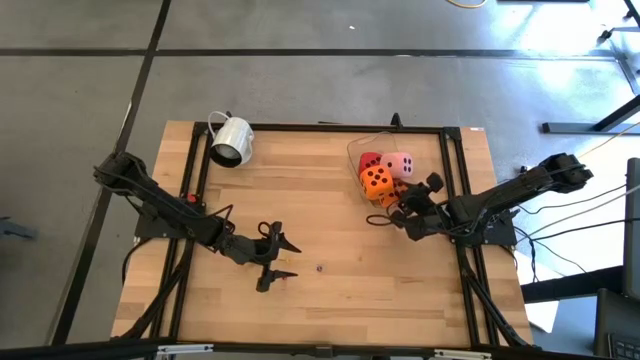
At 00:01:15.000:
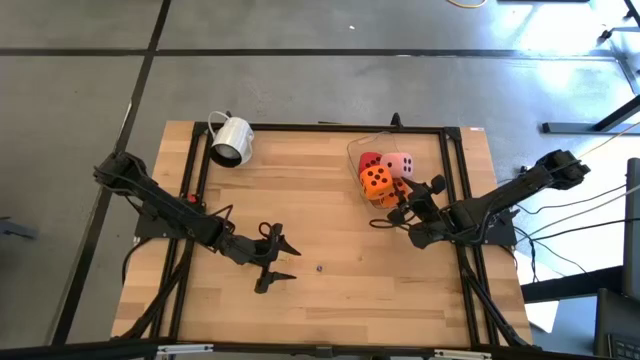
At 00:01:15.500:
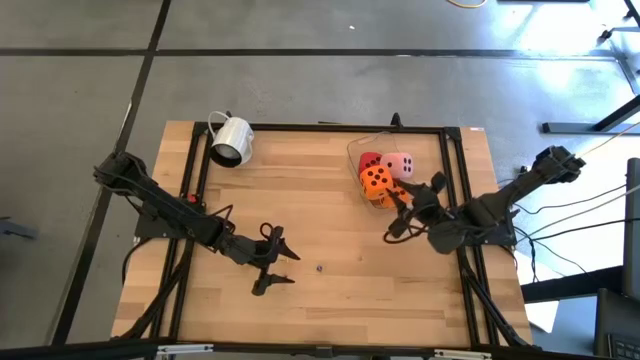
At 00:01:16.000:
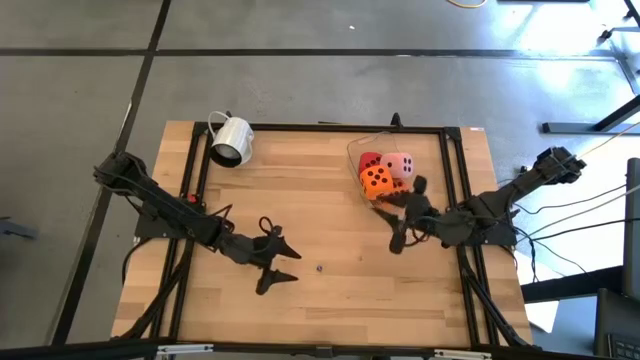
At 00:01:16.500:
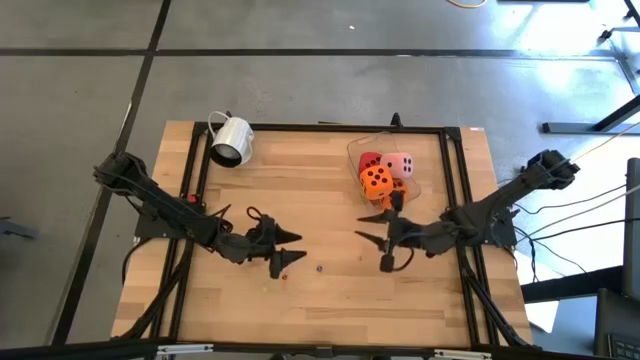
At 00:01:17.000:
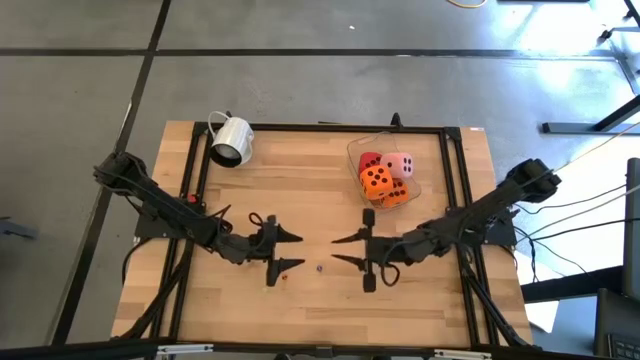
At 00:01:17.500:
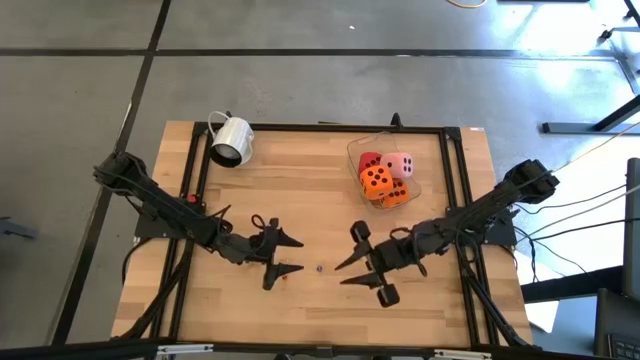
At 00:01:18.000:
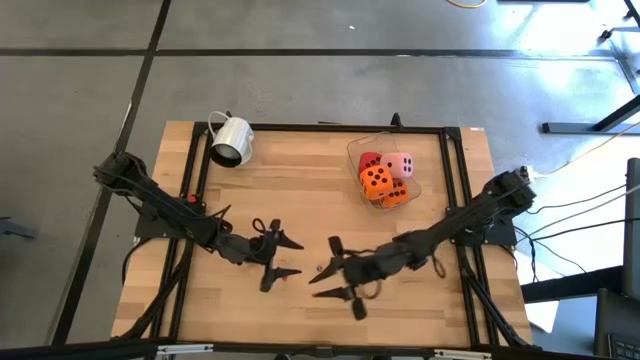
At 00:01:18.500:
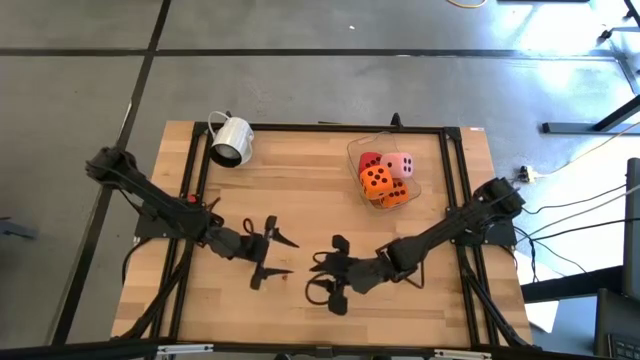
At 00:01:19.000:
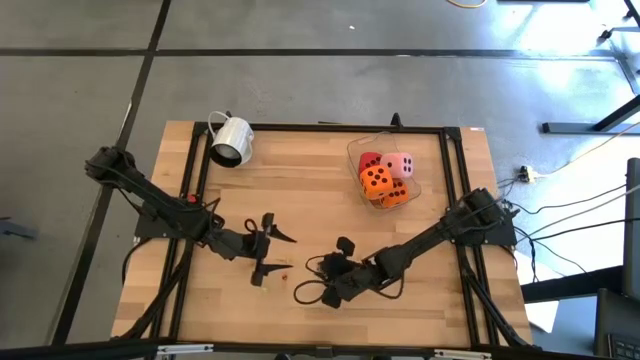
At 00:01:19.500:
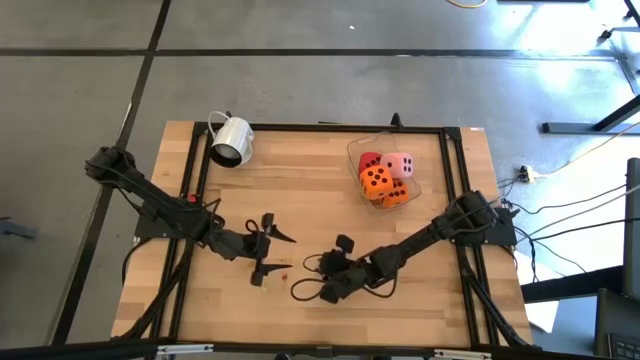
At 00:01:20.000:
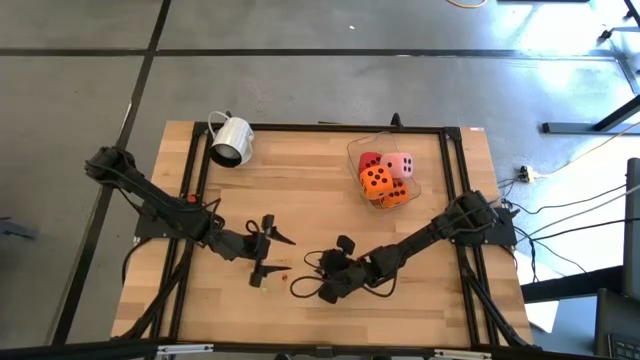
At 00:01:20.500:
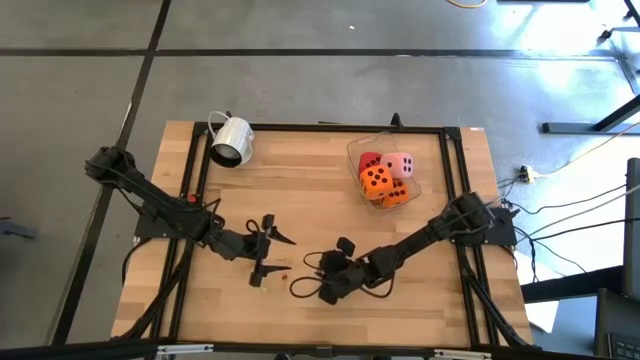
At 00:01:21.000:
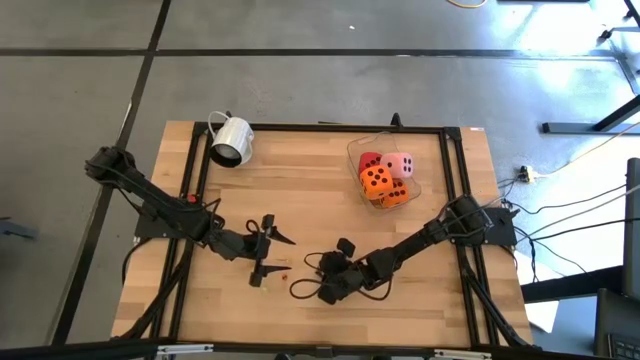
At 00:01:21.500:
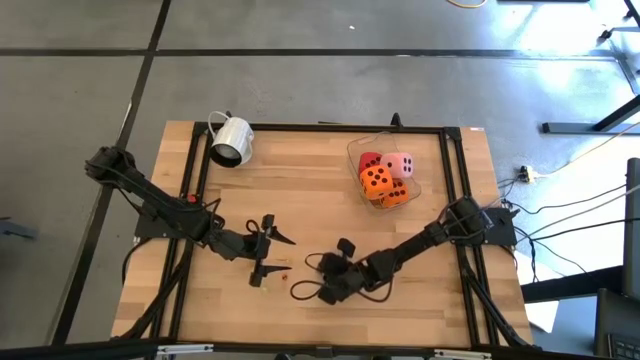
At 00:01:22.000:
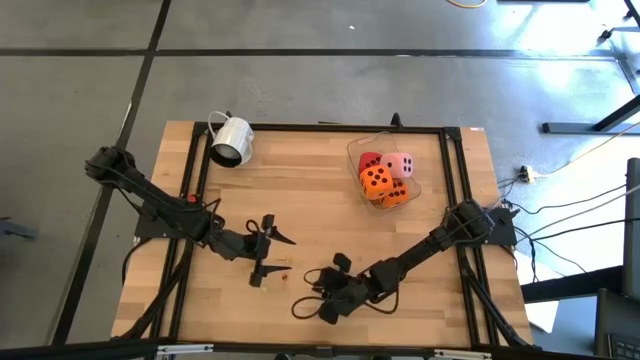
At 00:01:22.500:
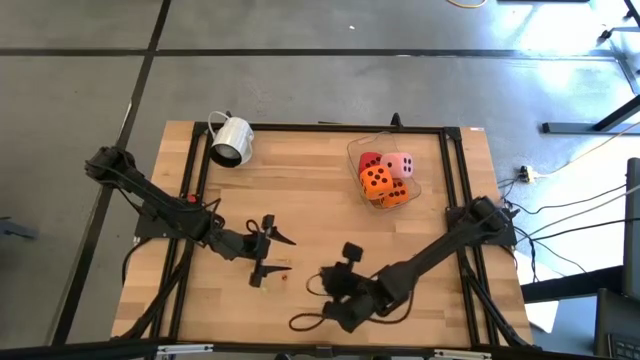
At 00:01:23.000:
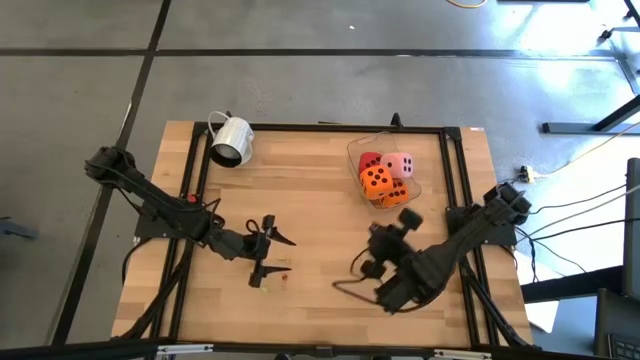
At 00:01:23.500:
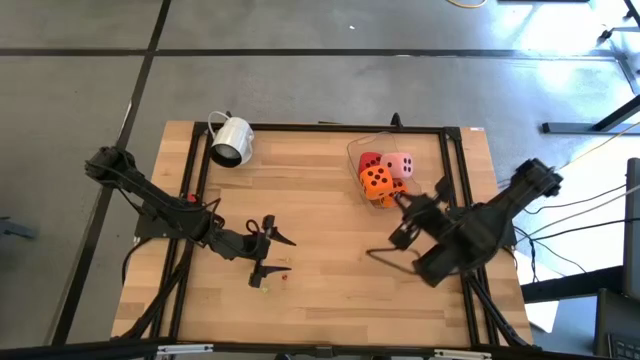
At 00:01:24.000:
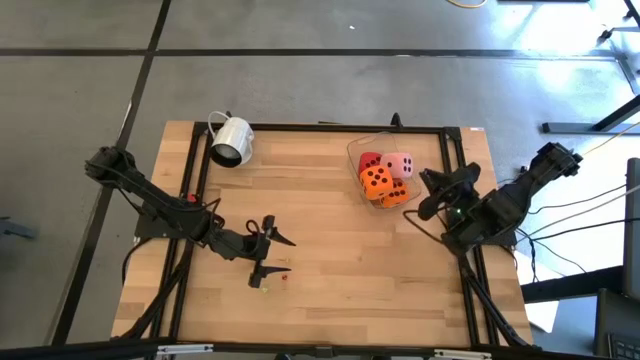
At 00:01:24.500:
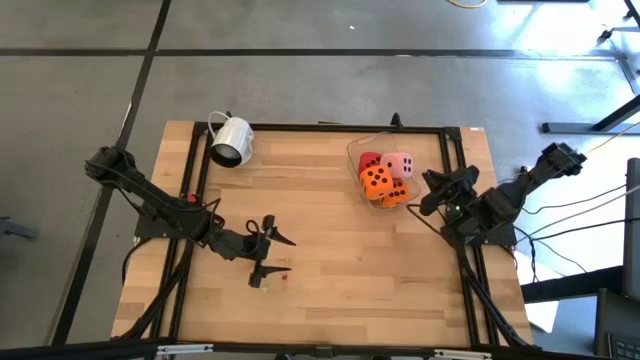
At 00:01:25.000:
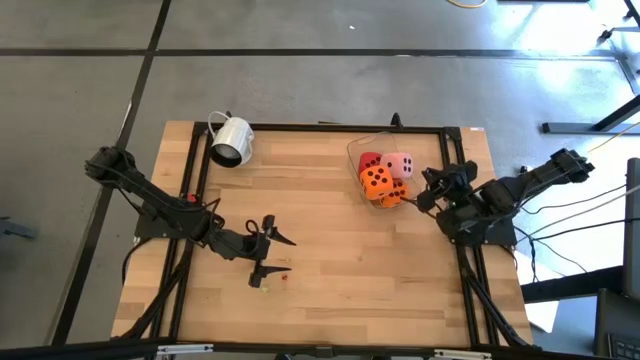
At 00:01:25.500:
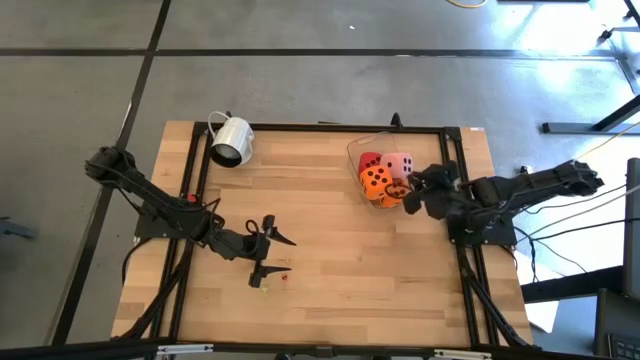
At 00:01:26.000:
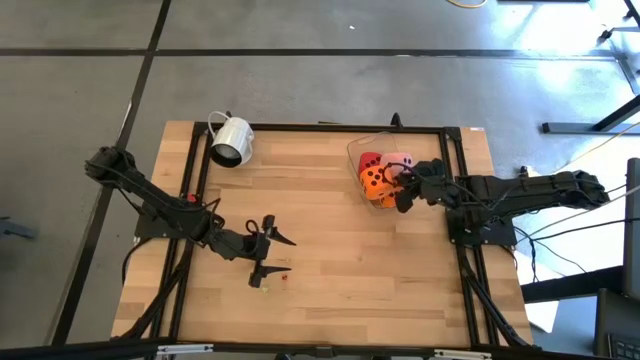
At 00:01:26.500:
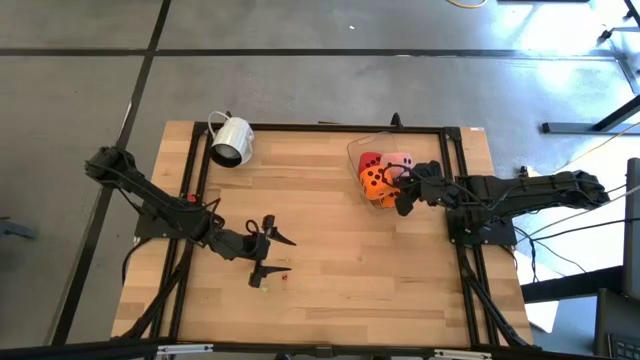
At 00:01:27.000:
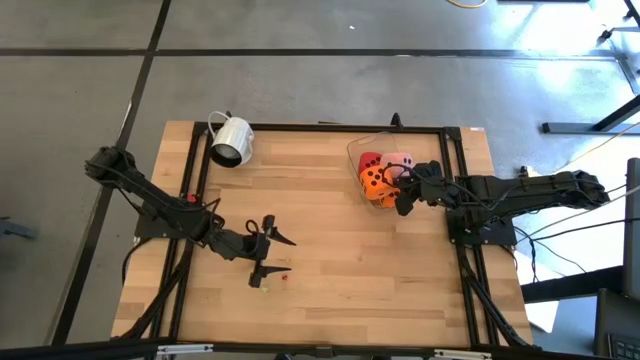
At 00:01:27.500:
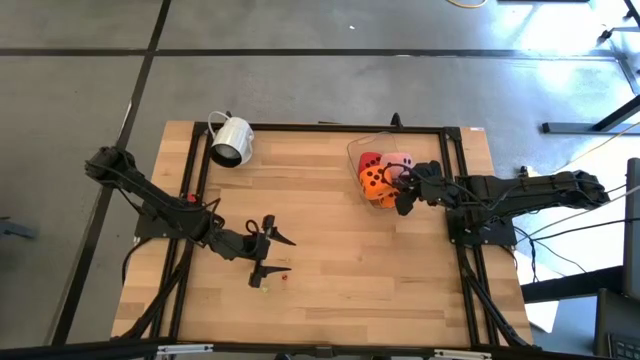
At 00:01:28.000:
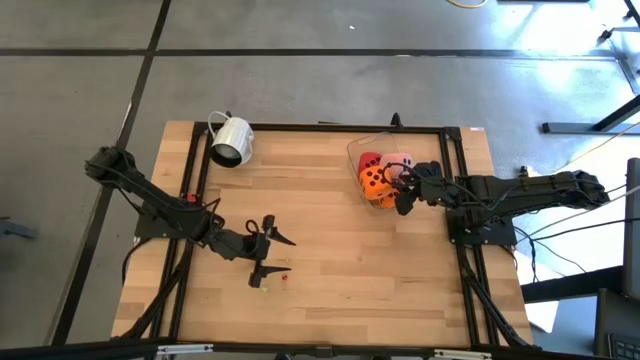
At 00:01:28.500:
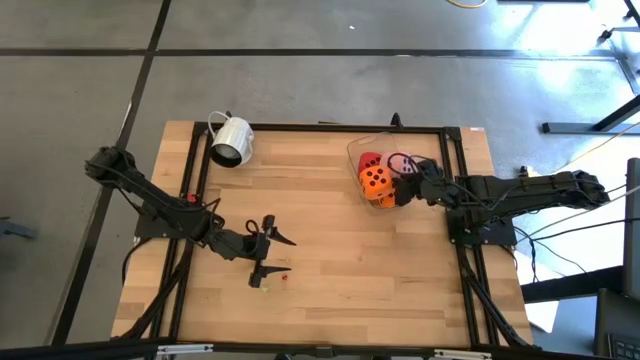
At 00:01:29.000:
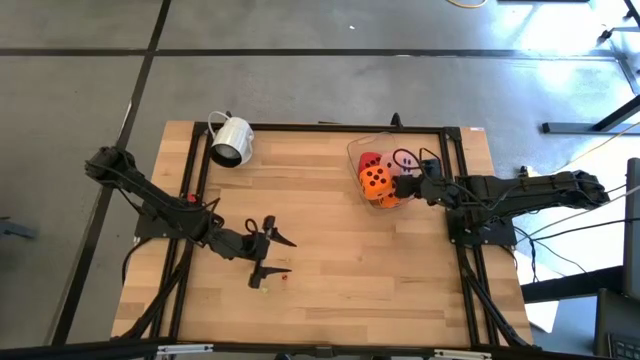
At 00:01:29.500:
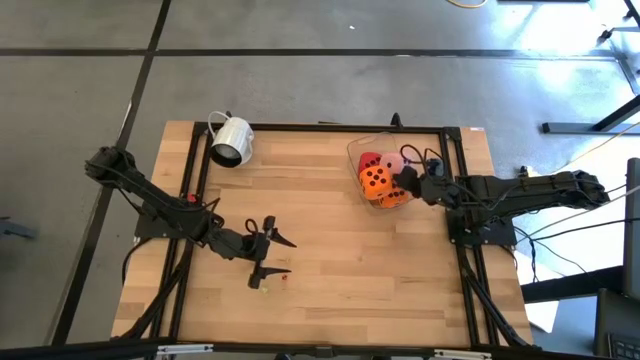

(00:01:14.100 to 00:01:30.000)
Task: Pick & Place Dice
Put the small blue die in the bin

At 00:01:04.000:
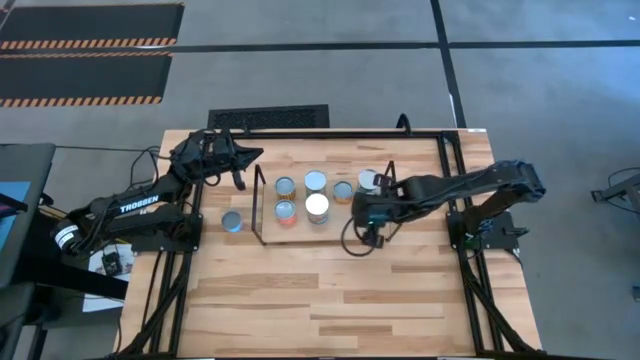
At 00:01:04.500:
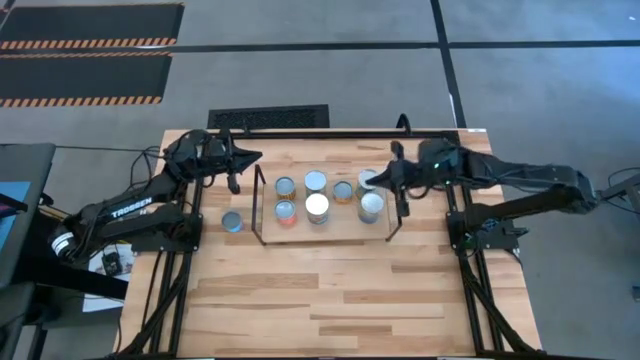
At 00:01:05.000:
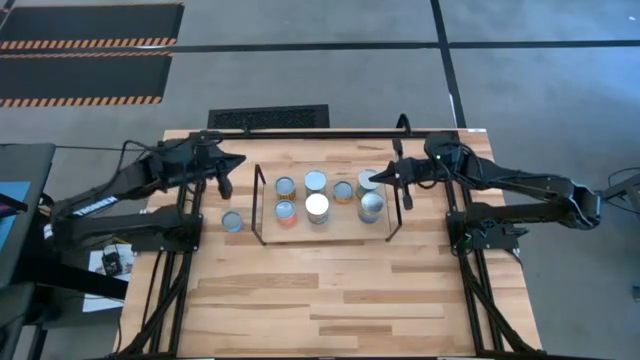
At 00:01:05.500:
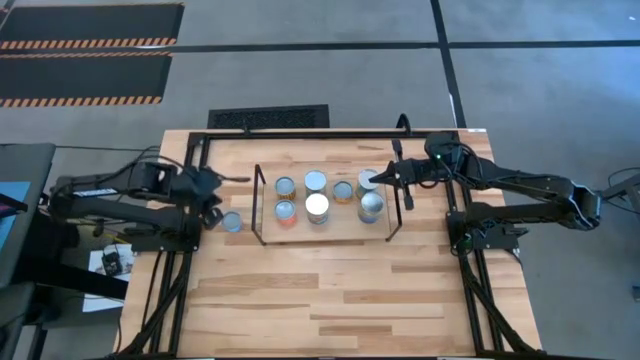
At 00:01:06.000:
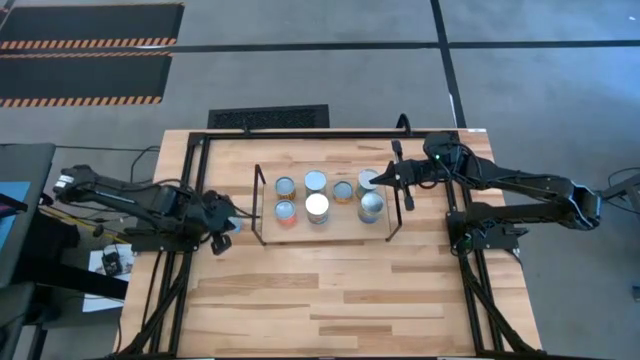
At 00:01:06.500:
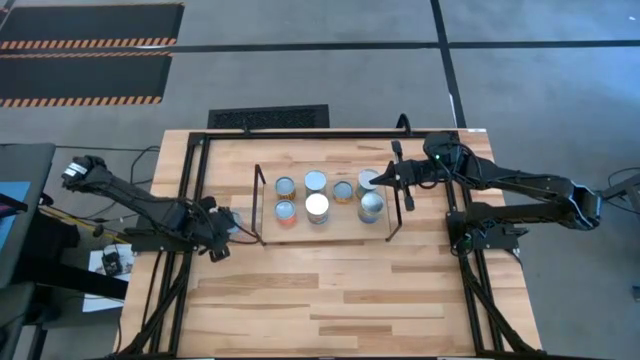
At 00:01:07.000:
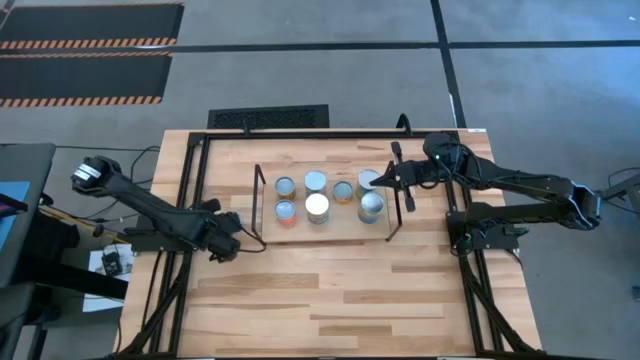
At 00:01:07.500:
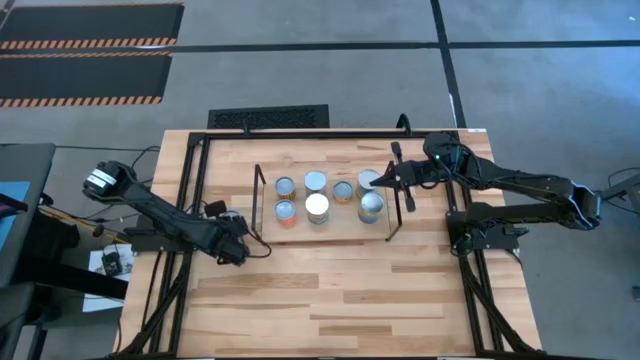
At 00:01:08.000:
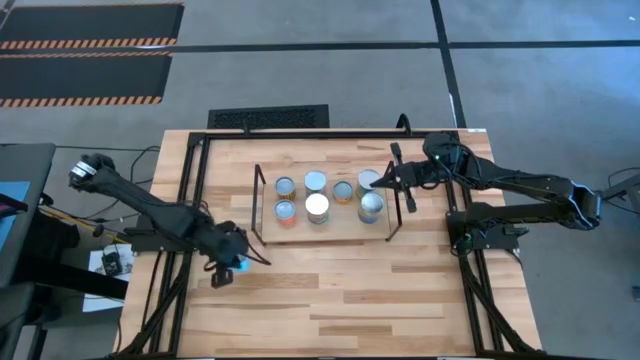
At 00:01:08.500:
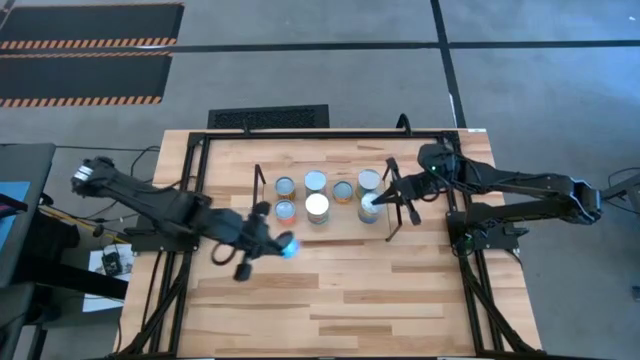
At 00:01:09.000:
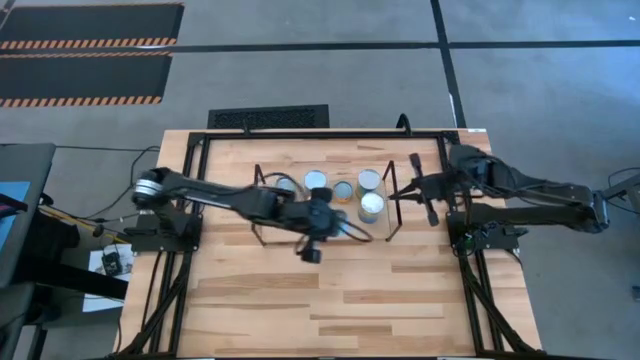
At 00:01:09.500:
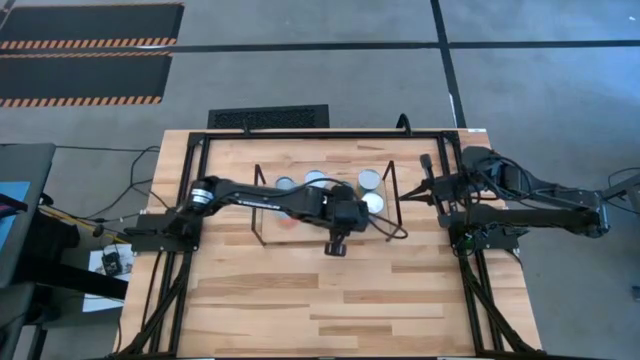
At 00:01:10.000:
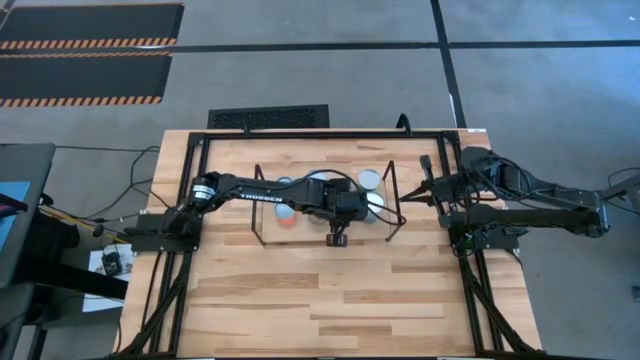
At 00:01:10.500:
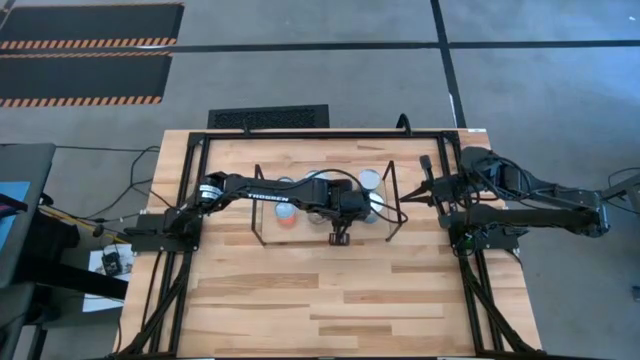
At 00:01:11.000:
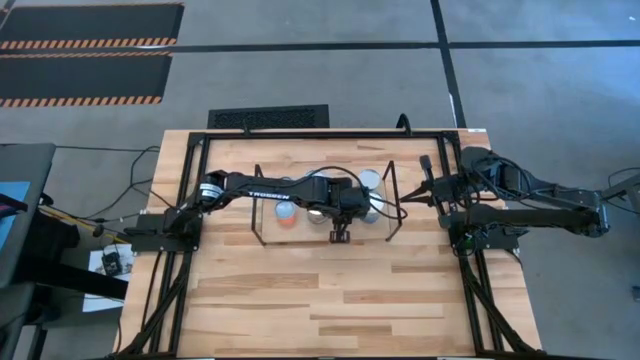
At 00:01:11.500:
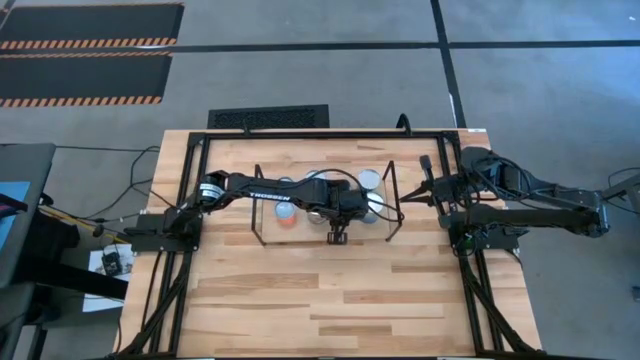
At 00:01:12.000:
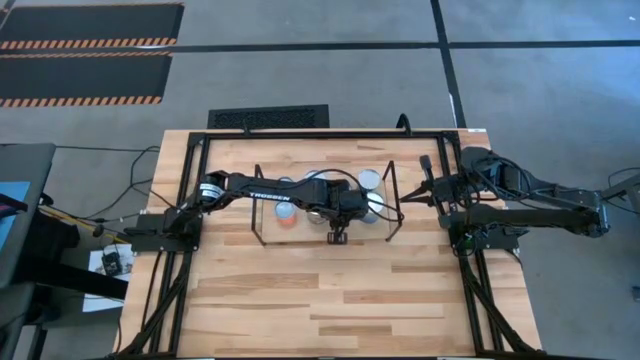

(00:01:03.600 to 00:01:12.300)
Task: Pick and place cans onto a shelf
Put the salmon can on the shelf aligned with the pineapple rings can
